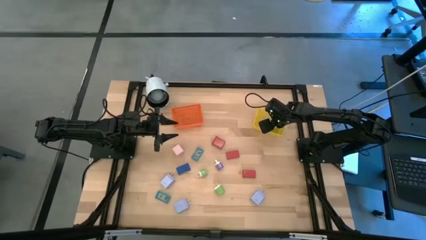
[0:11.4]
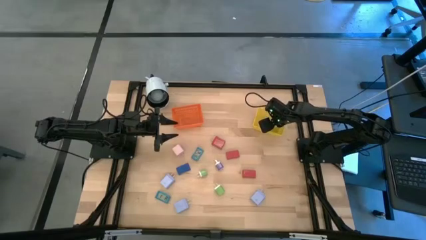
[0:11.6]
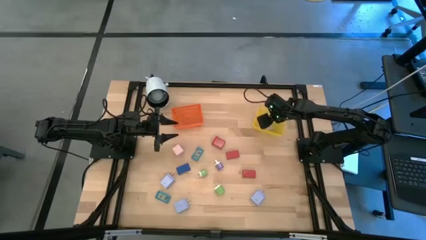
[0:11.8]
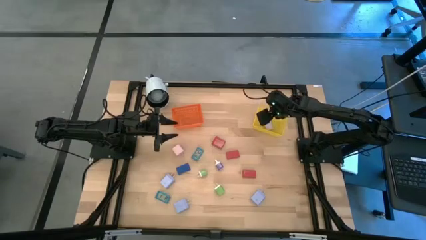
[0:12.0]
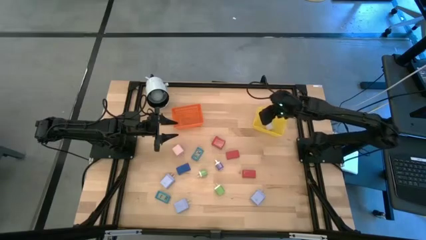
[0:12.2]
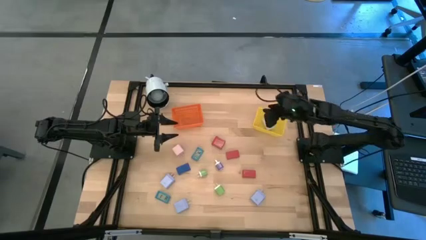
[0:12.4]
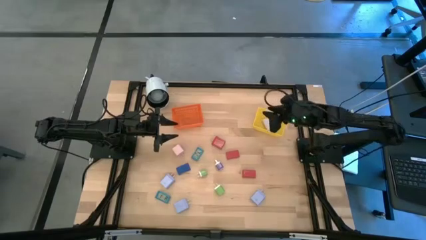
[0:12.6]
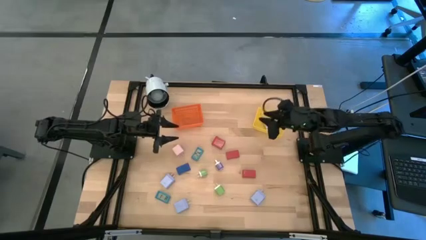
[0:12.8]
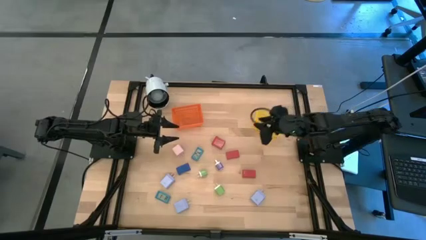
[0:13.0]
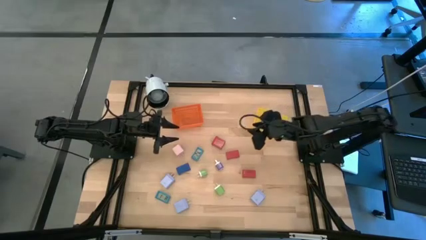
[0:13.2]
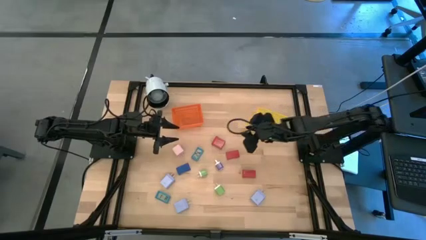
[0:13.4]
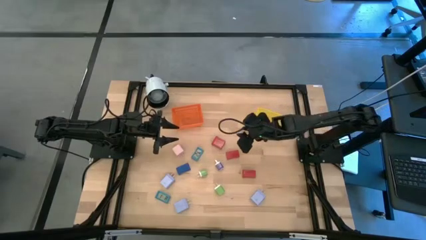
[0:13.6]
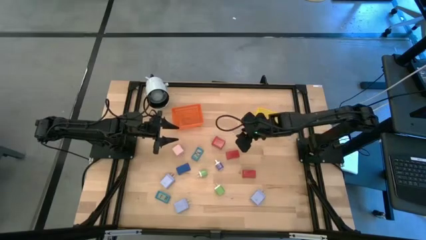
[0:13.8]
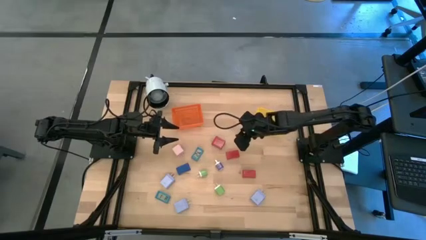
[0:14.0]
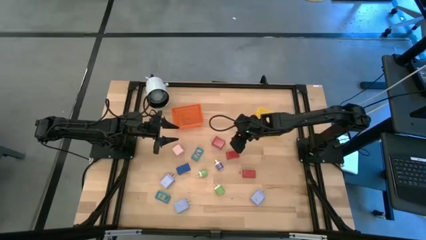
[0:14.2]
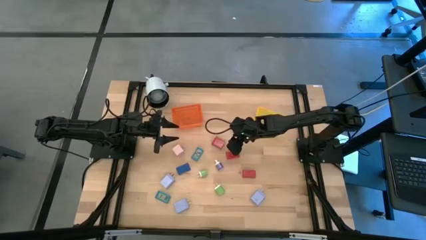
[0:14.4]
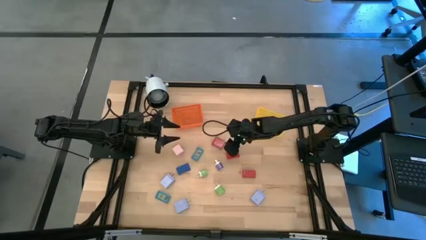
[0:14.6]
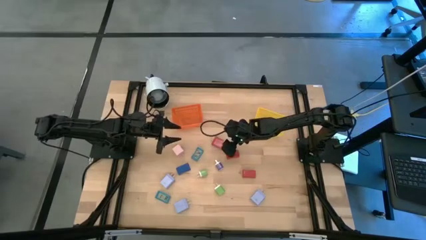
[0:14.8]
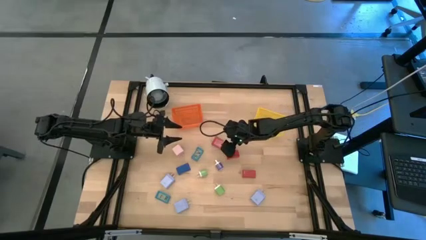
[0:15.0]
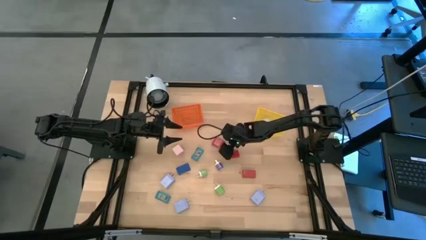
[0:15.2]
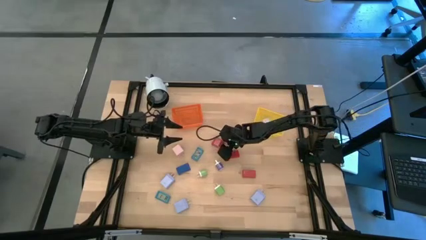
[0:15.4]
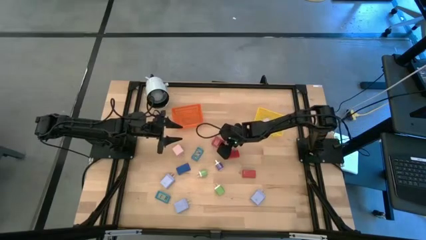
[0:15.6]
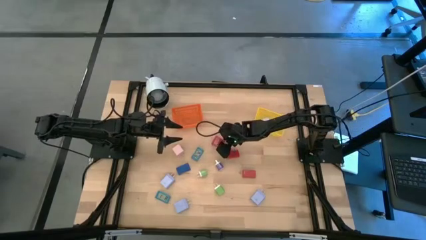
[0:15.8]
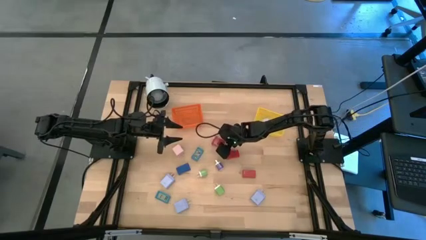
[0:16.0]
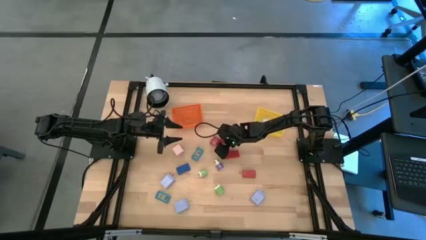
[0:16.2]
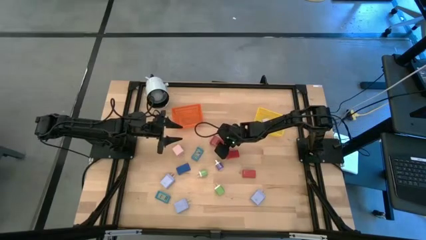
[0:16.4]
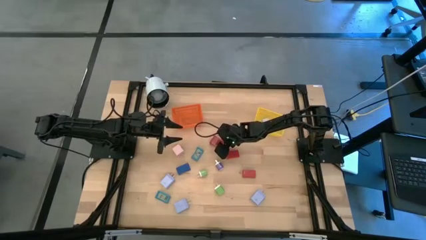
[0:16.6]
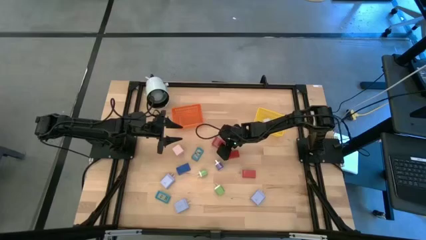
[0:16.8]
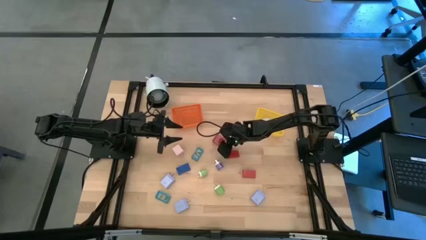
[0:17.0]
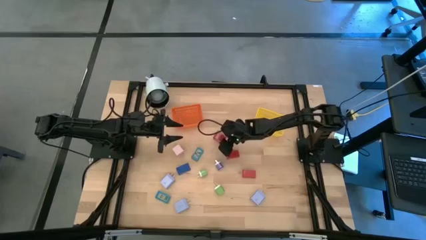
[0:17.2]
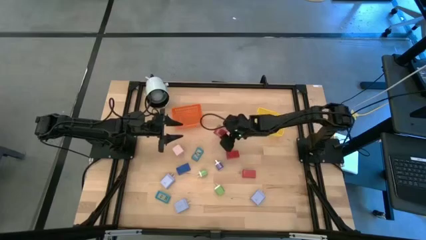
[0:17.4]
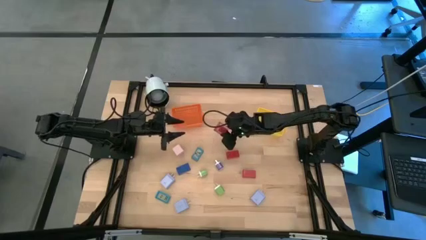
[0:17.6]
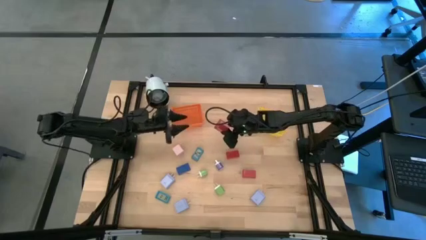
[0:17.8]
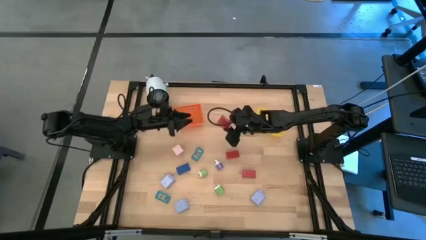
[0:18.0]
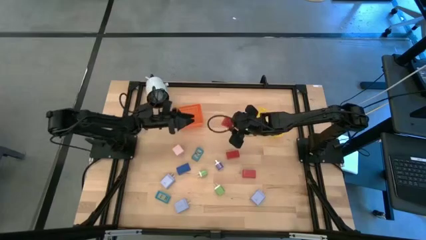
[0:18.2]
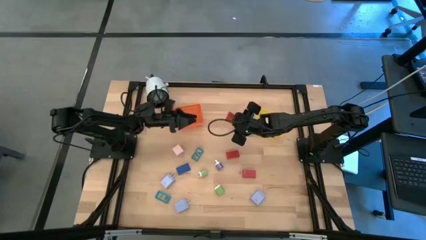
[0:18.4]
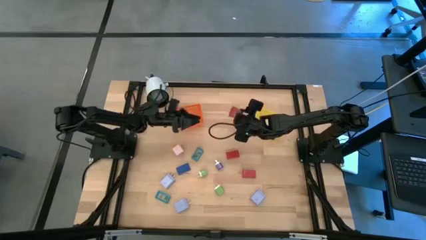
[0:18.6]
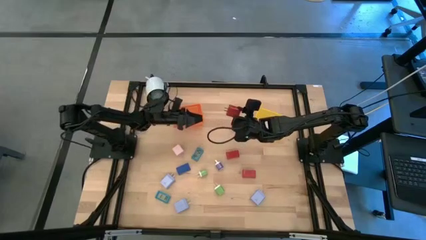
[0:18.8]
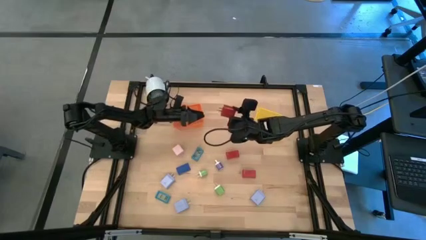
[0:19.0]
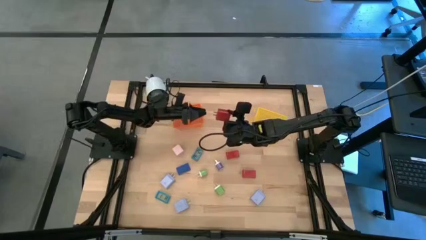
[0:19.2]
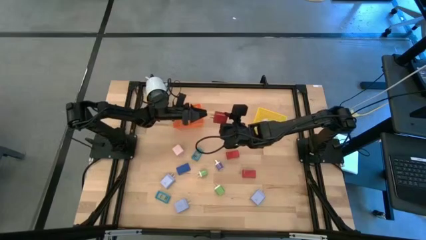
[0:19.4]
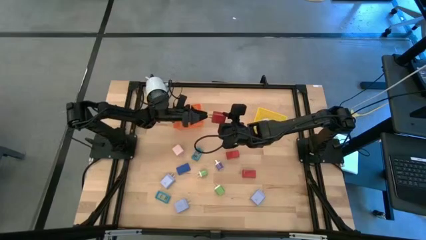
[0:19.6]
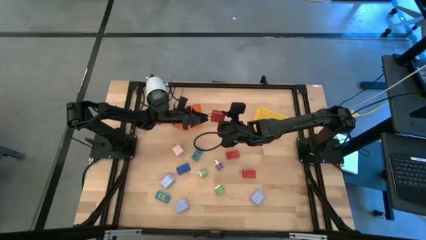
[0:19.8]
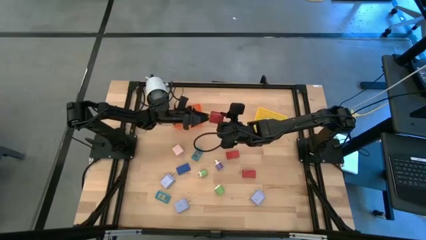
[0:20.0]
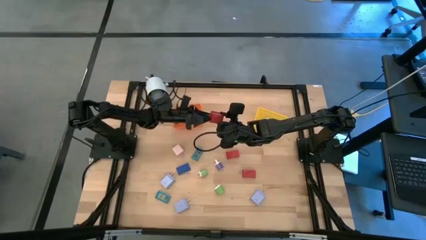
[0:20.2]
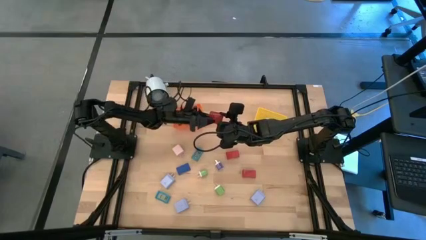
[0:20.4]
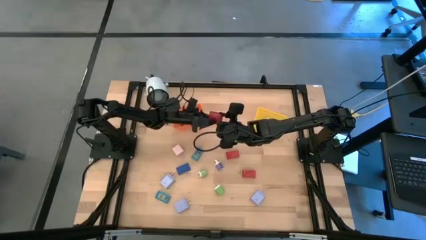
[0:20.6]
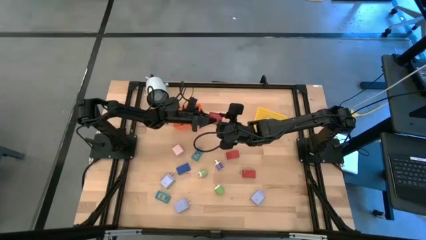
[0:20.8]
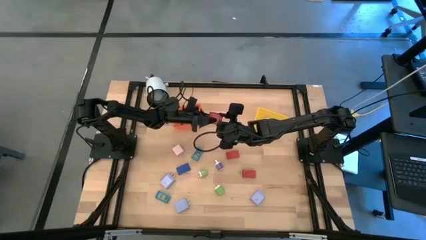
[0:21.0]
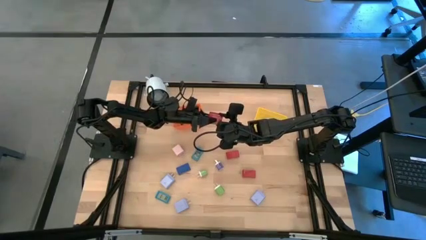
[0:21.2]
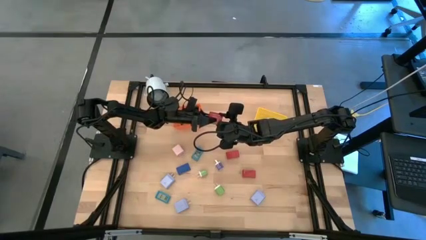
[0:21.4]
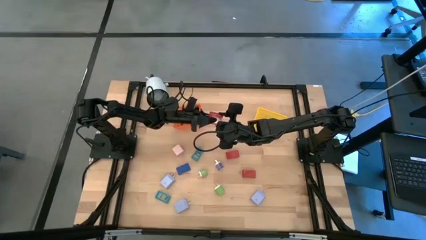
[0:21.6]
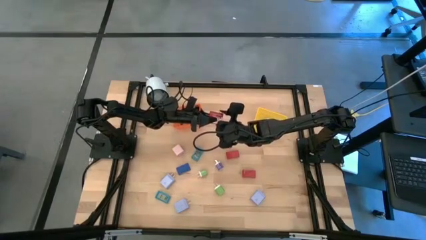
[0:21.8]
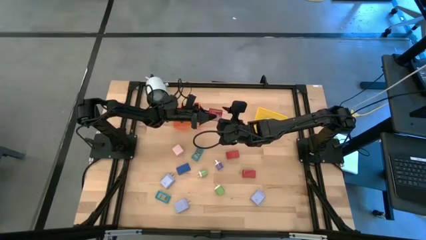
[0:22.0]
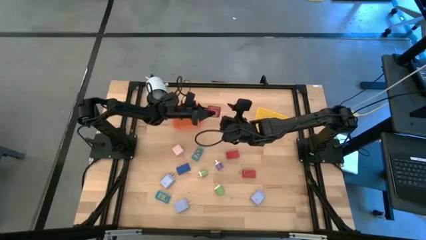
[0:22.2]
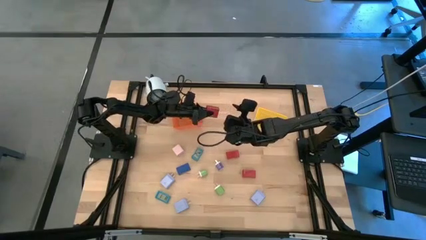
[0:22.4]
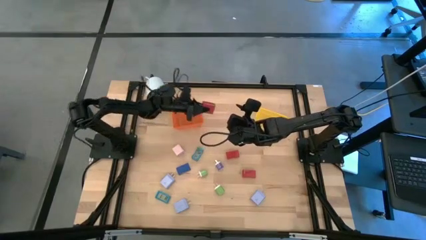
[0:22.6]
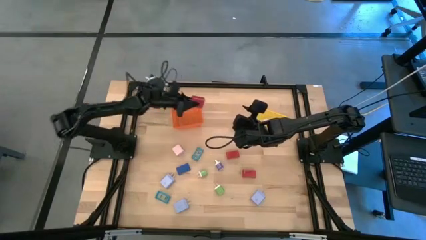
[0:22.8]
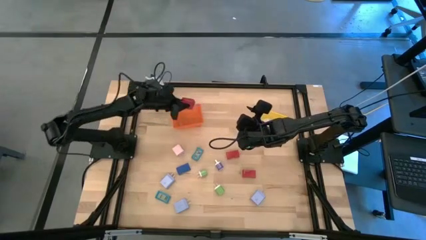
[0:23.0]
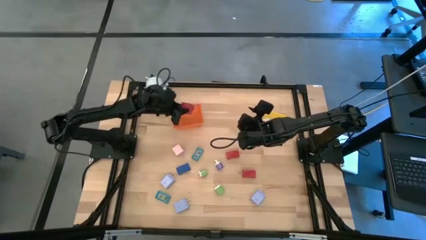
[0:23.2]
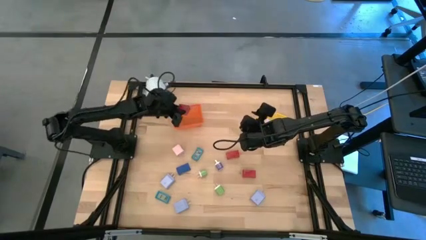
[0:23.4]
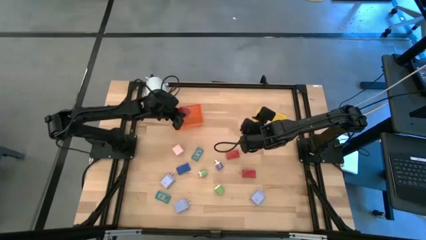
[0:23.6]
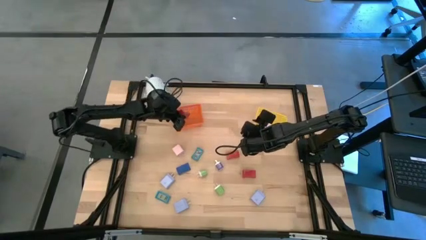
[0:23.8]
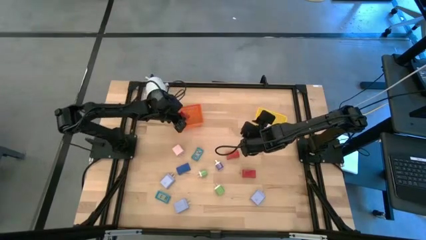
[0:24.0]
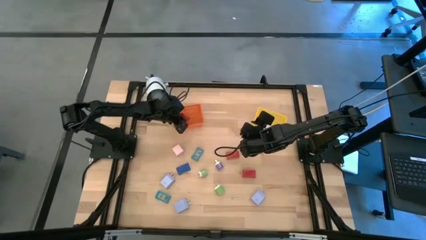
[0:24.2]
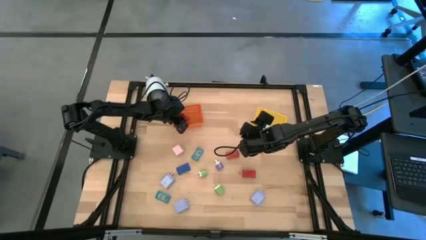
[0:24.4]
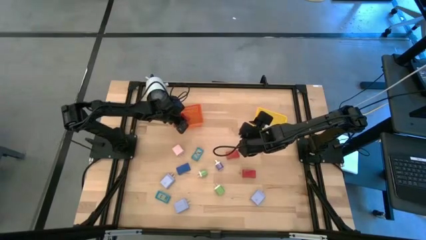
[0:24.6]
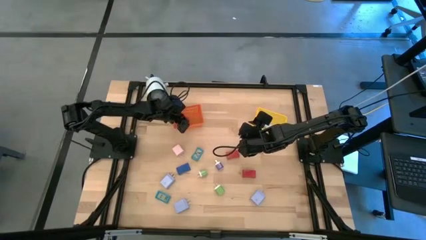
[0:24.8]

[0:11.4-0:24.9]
Task: Pick & Place Office items
Put the red charger adapter into the orange bin
